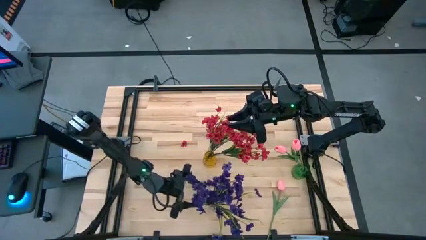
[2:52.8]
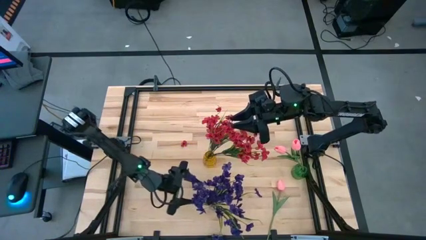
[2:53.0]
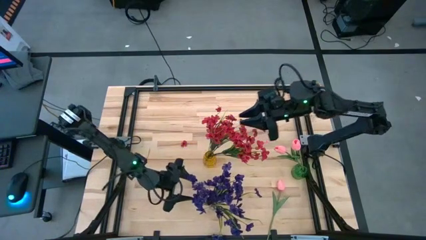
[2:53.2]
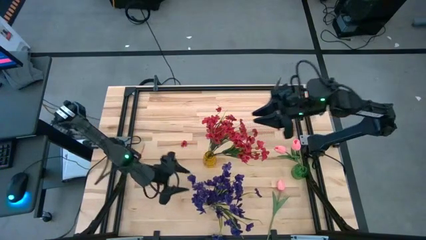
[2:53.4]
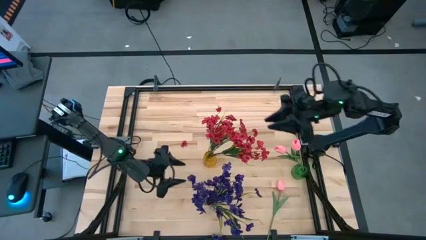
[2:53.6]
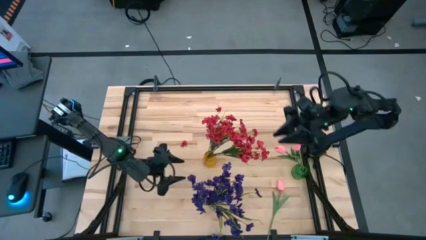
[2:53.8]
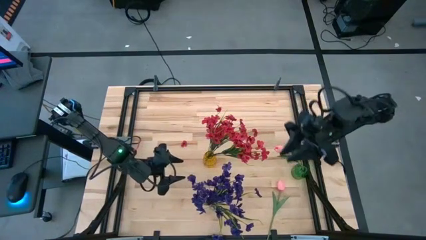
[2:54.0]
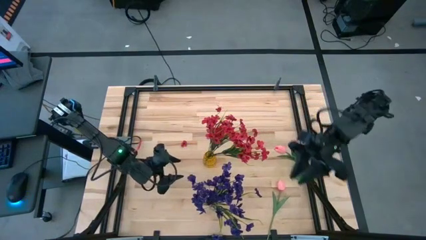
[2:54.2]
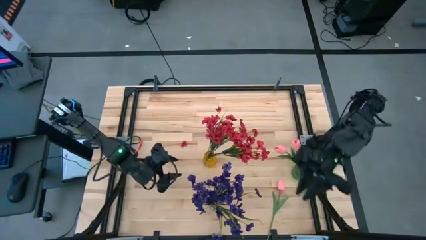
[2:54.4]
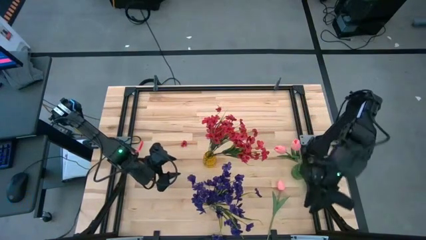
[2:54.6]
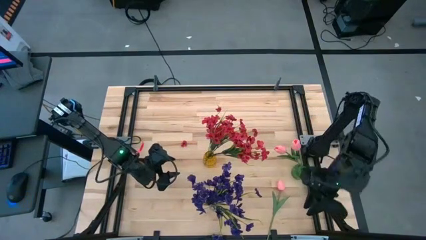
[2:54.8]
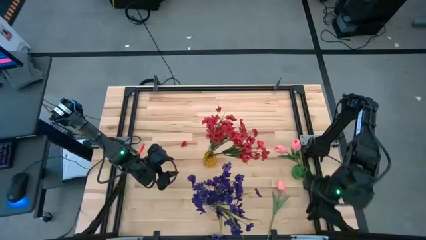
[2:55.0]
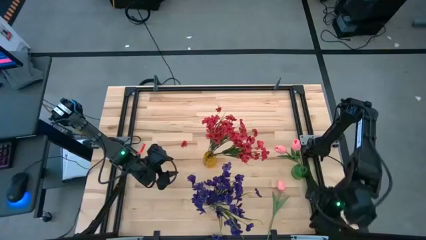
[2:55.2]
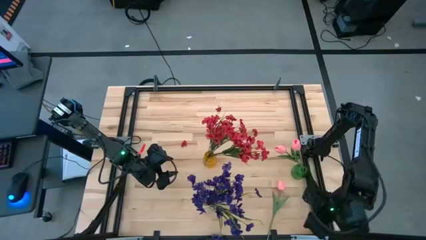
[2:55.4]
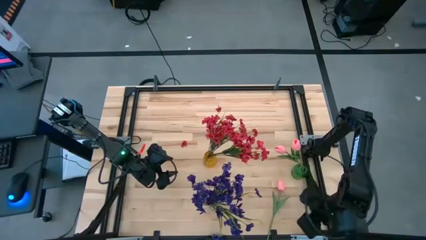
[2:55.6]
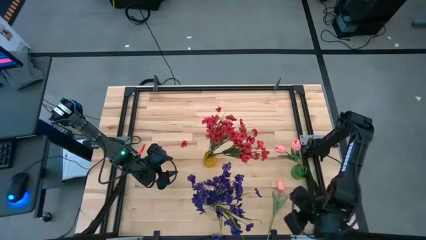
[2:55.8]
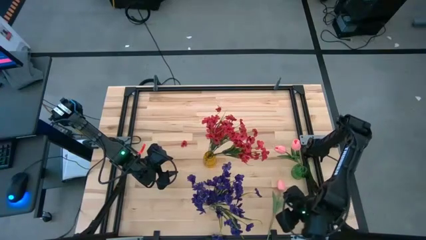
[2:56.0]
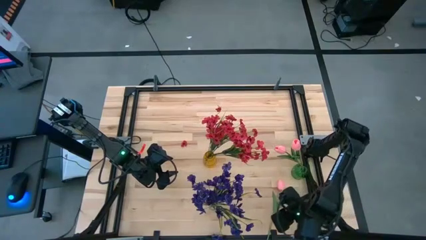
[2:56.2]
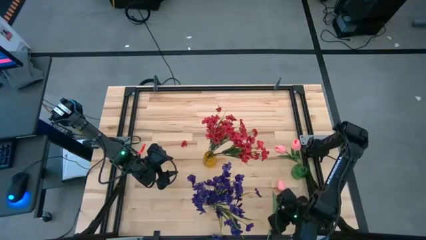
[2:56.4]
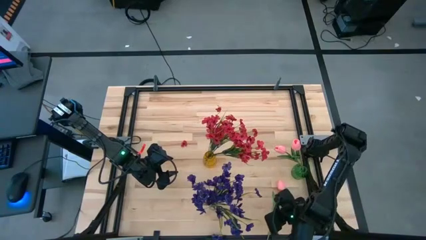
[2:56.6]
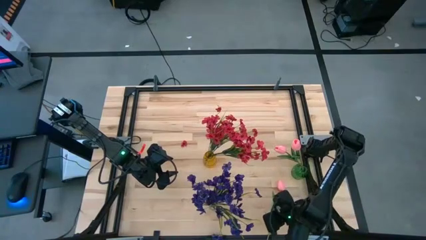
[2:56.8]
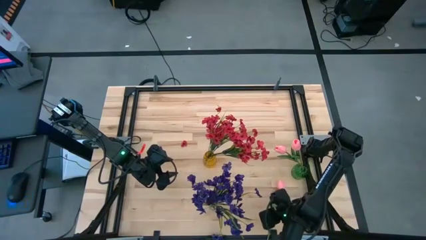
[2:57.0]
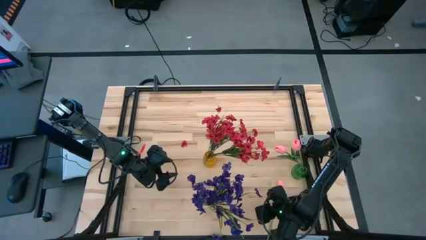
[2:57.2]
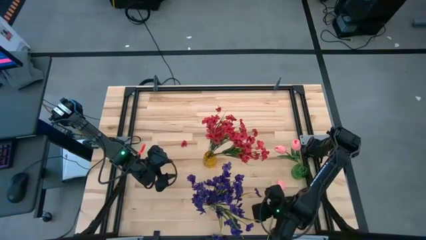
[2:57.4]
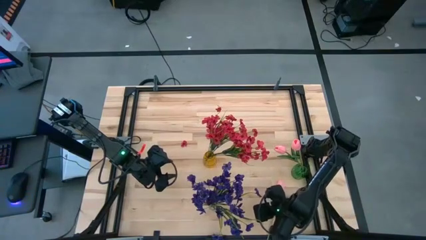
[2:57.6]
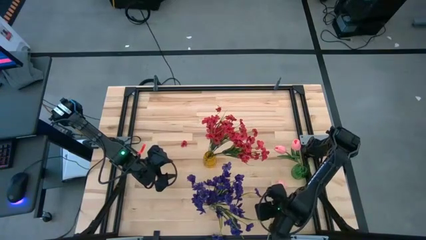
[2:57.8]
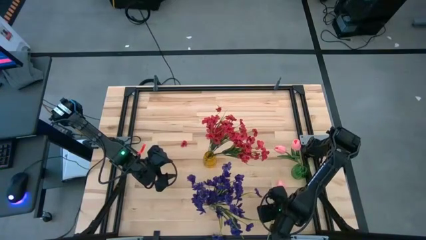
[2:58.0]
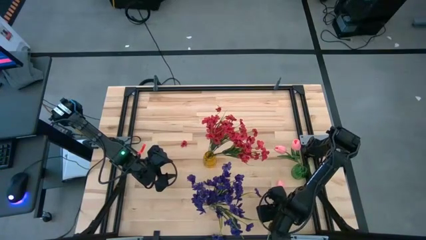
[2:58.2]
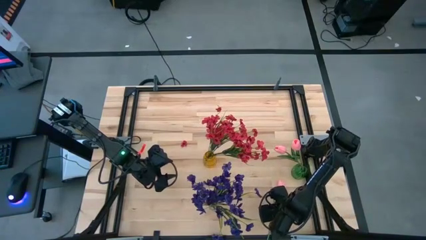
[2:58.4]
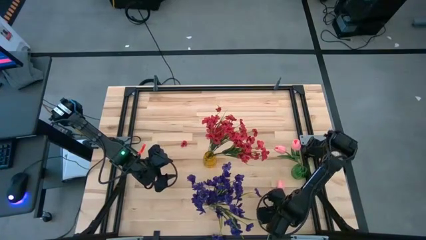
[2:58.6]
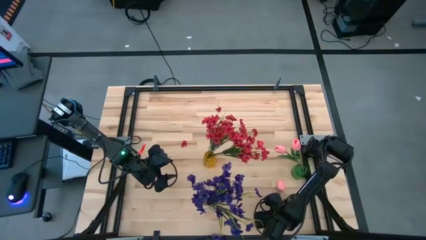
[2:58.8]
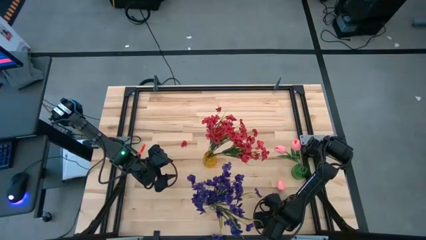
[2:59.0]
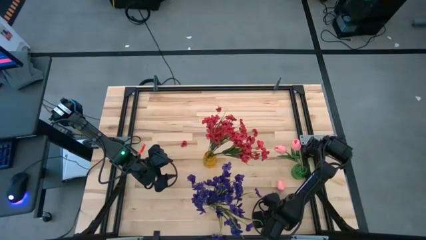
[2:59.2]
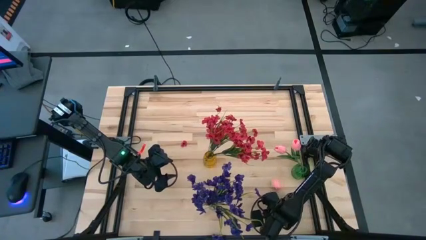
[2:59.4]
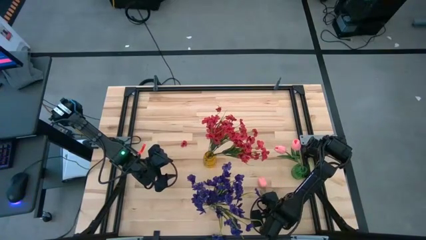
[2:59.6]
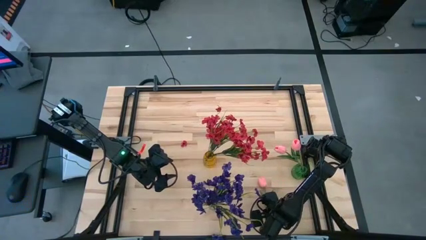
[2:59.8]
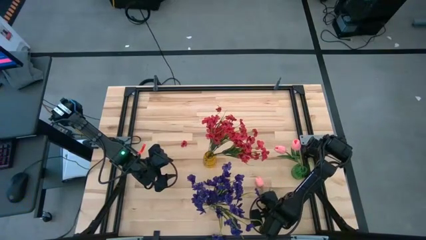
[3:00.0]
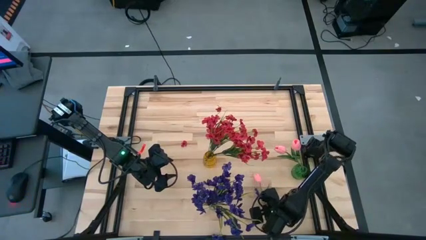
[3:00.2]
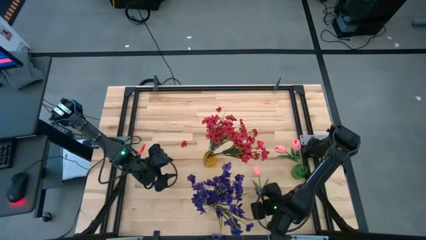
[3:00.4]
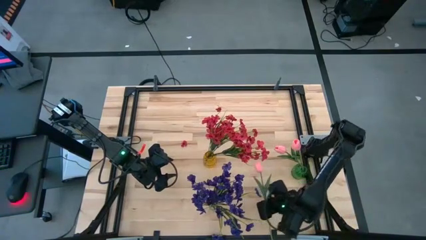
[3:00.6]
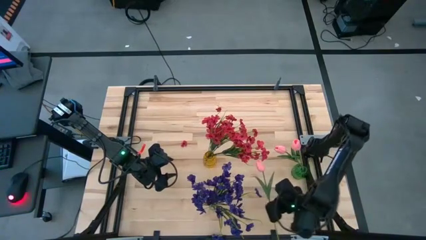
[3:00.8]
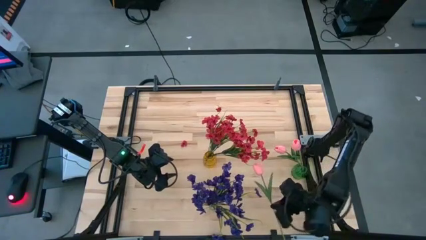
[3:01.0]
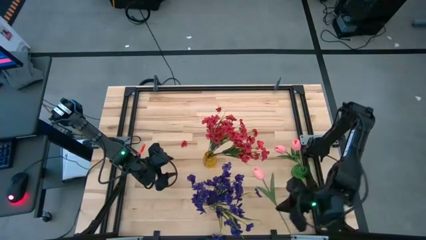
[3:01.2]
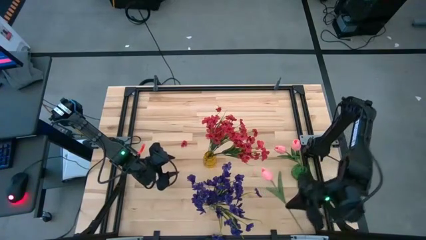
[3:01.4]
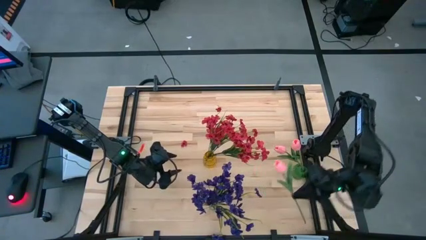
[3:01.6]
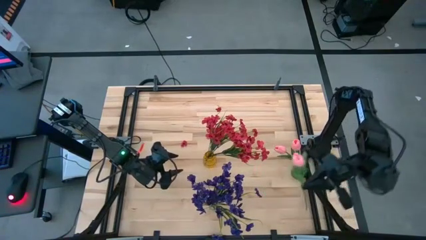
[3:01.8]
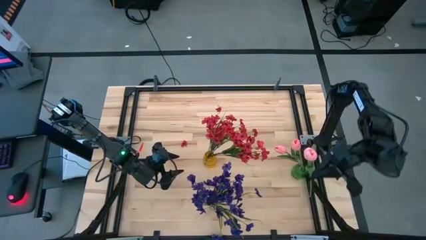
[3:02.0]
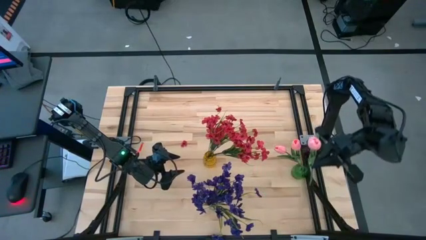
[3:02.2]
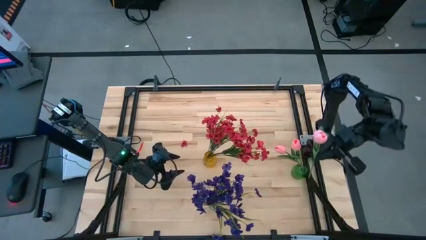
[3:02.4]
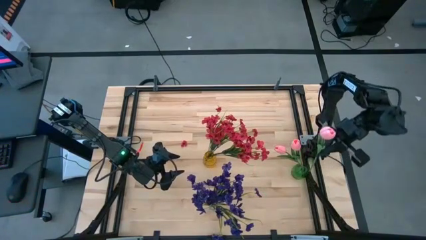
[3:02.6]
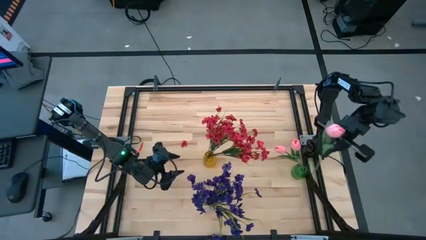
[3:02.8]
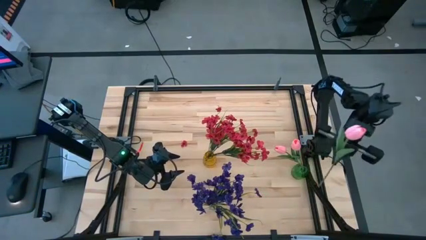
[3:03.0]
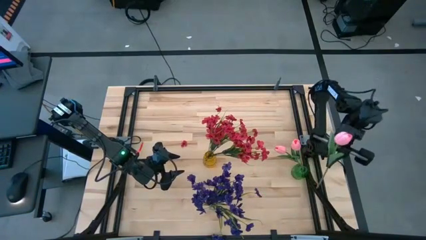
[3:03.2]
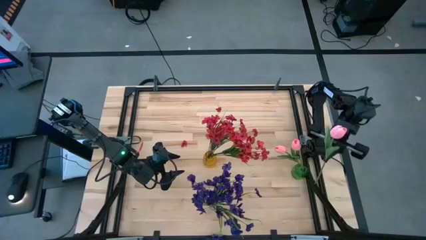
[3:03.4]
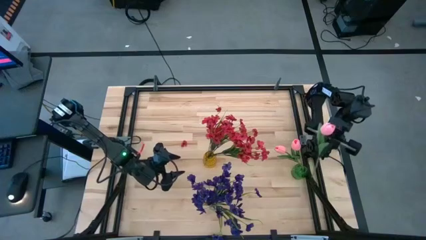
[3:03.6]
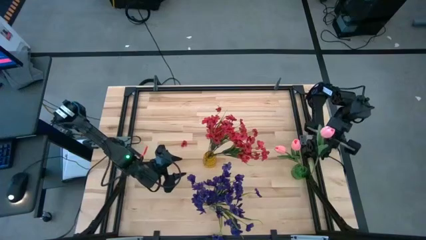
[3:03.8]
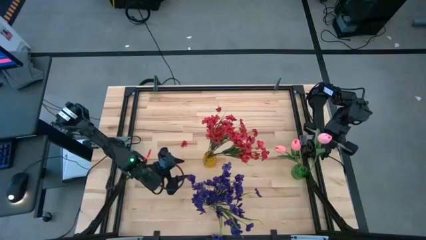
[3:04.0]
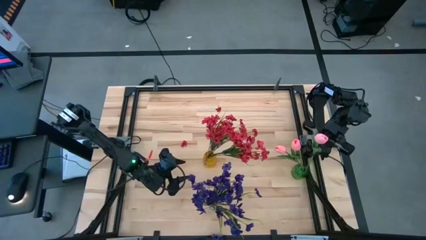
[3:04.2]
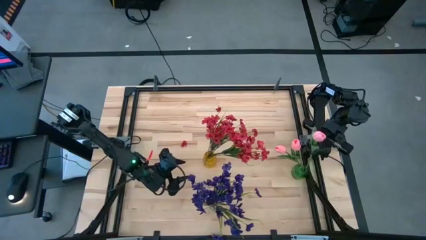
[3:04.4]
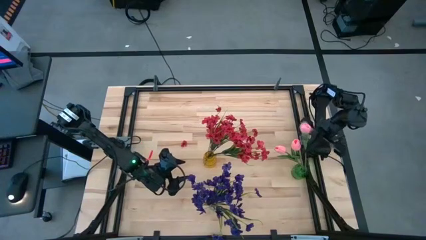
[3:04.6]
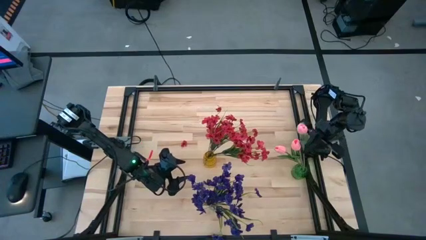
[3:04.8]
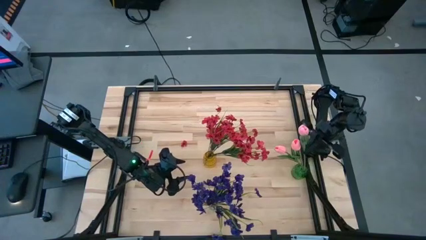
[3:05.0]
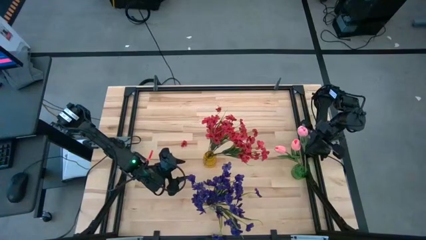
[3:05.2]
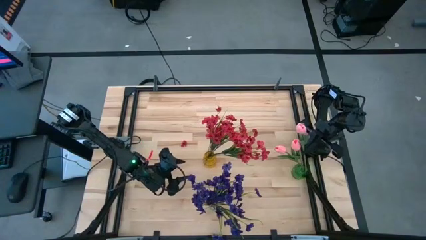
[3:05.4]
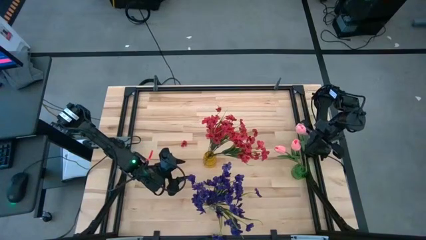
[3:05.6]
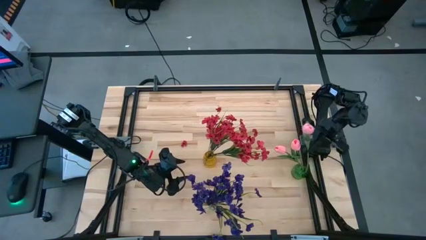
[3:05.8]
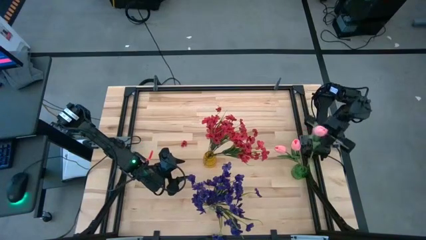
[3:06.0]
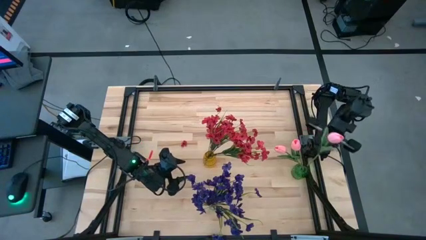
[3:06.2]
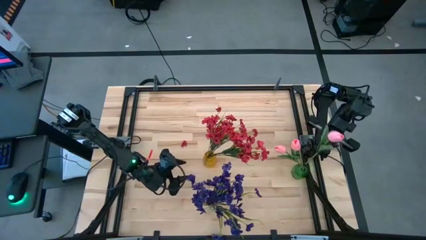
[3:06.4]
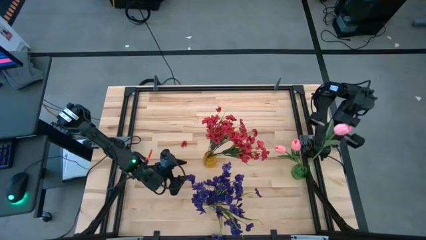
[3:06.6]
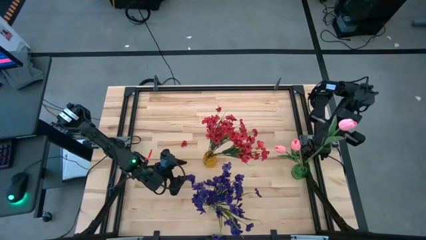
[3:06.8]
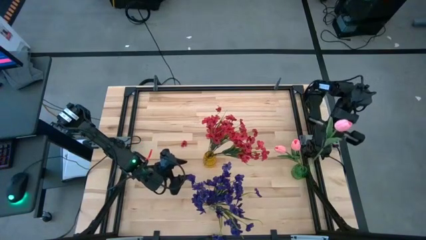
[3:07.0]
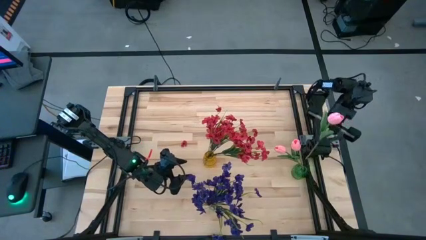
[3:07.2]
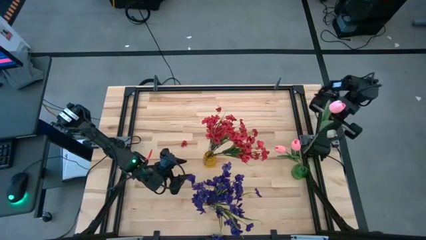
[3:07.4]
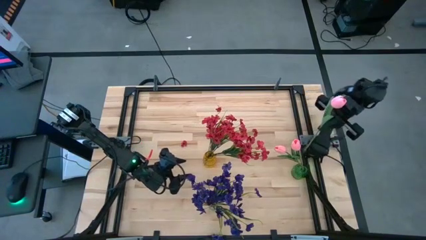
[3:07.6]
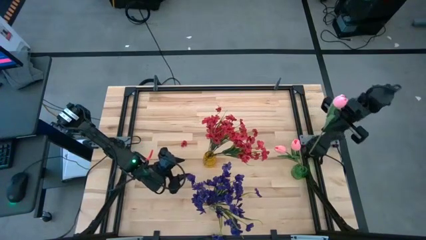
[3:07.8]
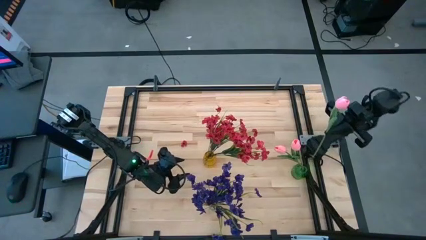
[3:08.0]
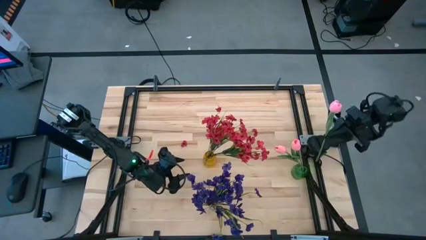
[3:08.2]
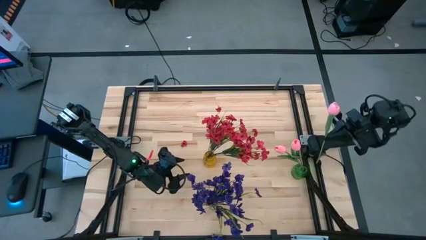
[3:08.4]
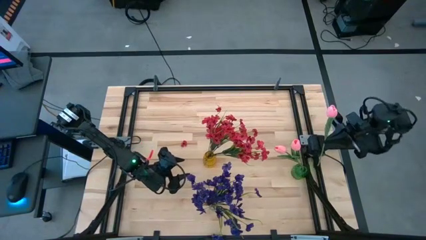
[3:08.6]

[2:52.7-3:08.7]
Task: Sort flowers into vase by color
Put the pink tulip into the green vase
